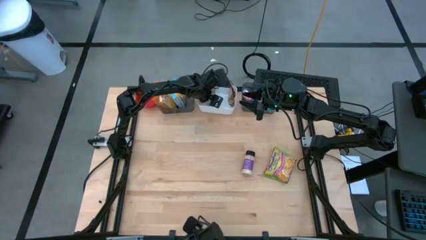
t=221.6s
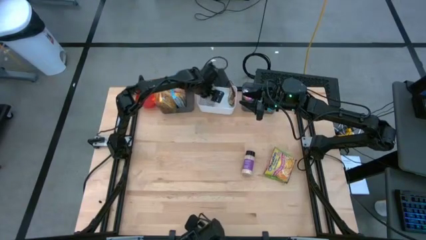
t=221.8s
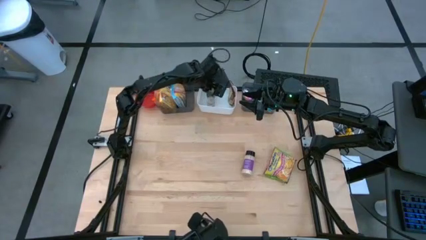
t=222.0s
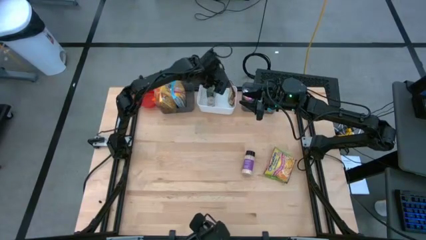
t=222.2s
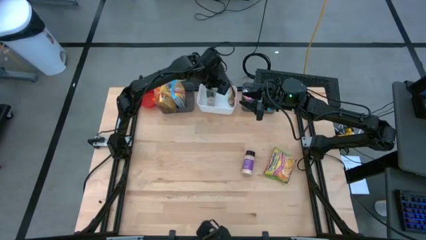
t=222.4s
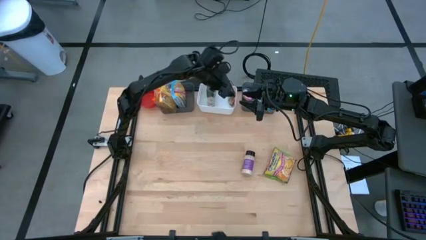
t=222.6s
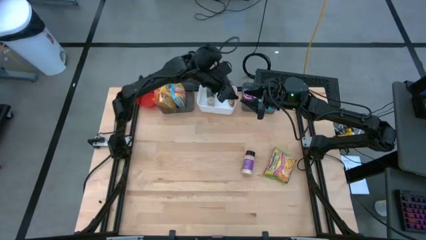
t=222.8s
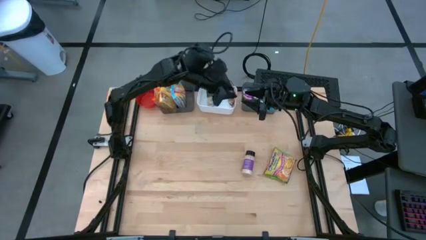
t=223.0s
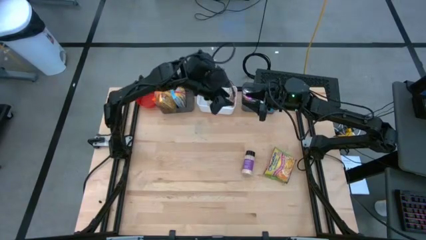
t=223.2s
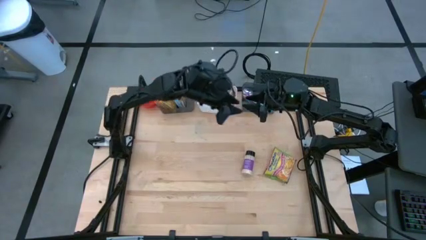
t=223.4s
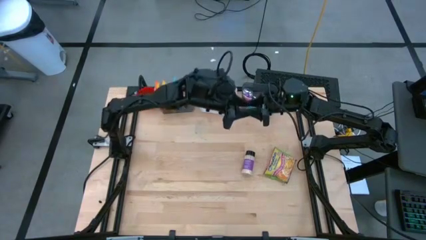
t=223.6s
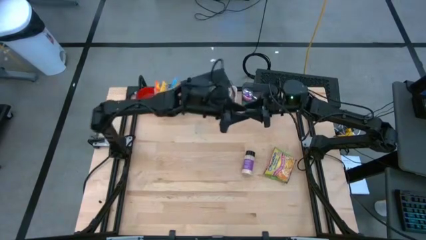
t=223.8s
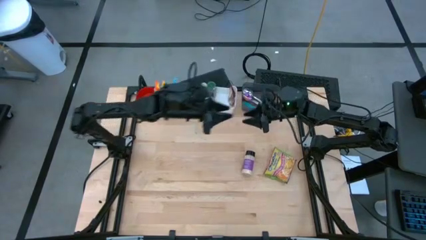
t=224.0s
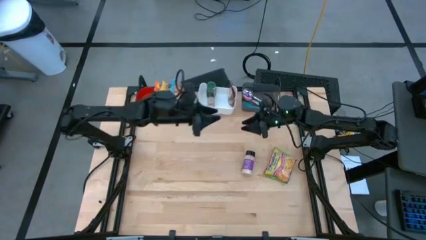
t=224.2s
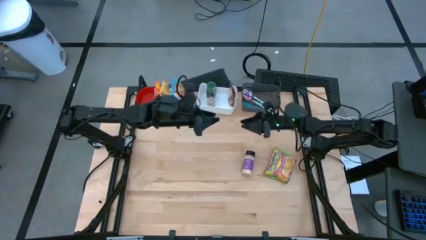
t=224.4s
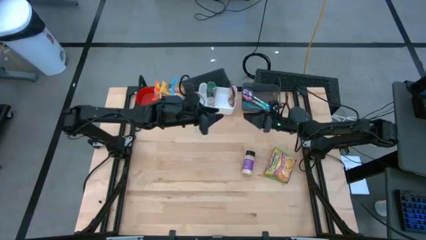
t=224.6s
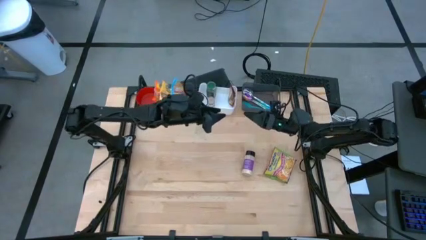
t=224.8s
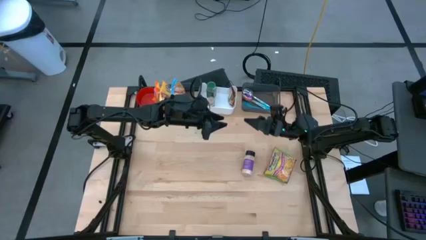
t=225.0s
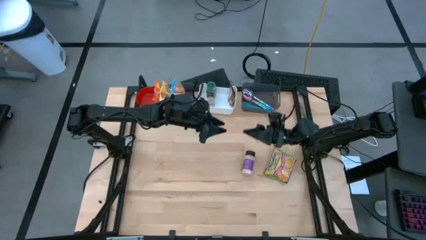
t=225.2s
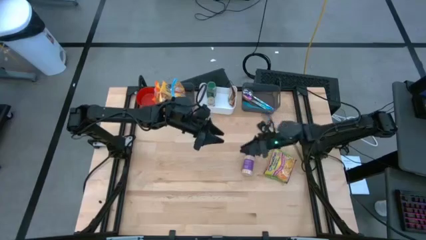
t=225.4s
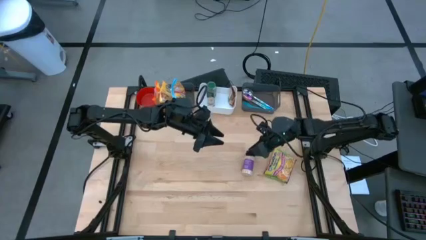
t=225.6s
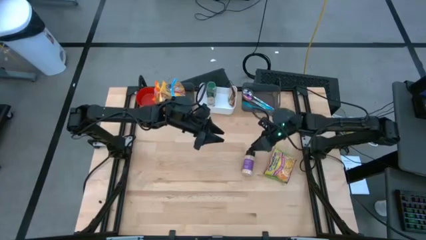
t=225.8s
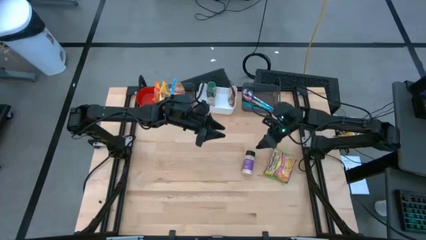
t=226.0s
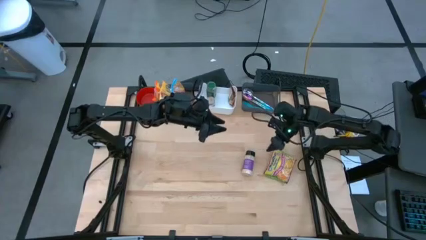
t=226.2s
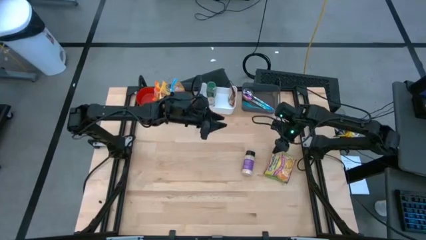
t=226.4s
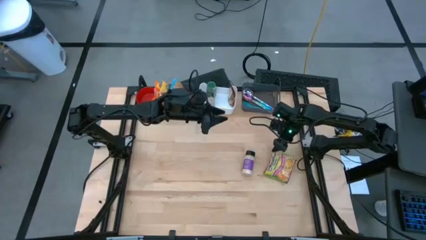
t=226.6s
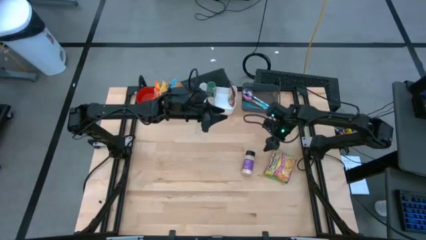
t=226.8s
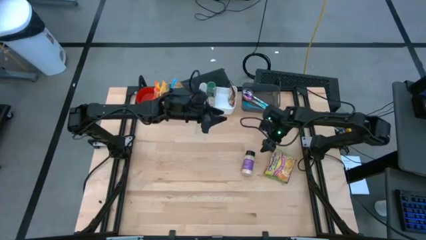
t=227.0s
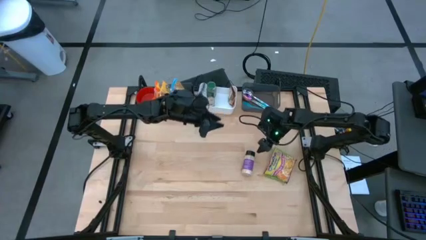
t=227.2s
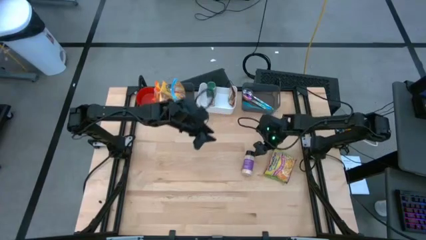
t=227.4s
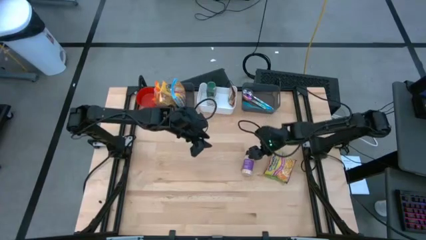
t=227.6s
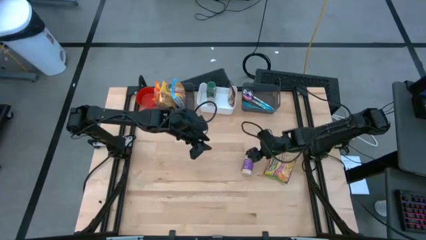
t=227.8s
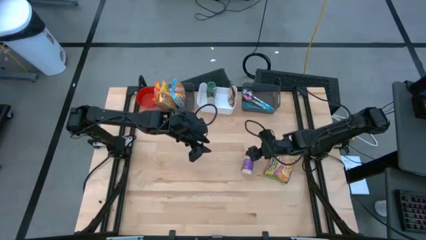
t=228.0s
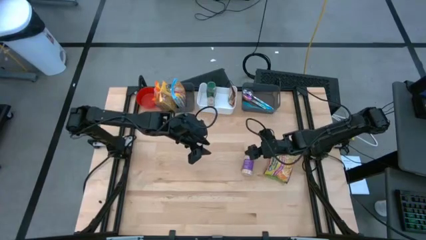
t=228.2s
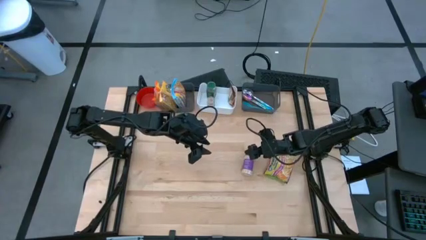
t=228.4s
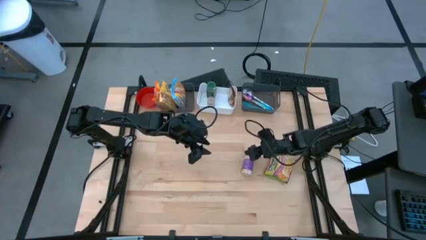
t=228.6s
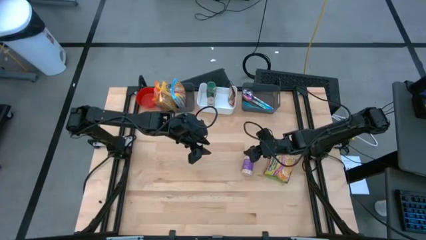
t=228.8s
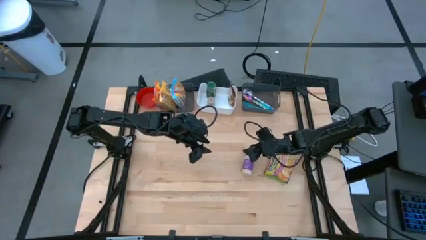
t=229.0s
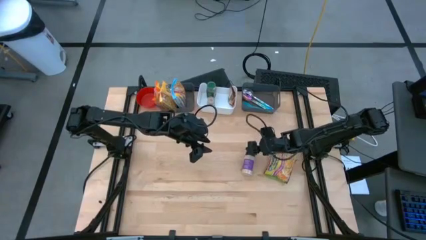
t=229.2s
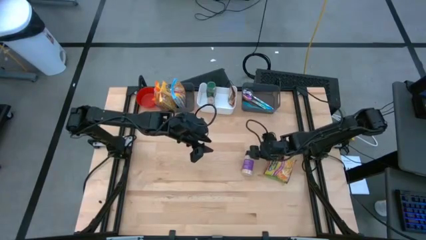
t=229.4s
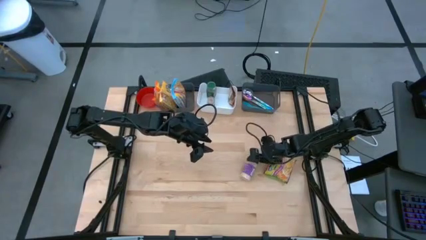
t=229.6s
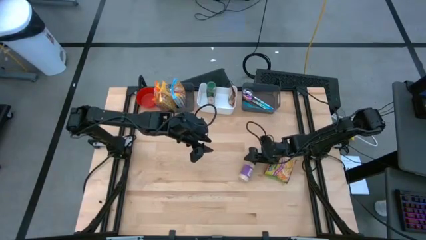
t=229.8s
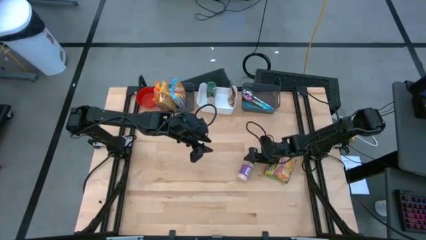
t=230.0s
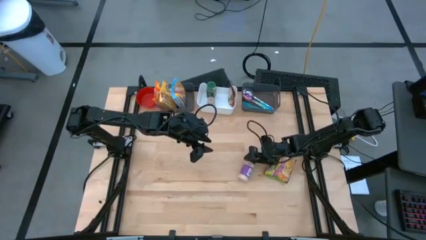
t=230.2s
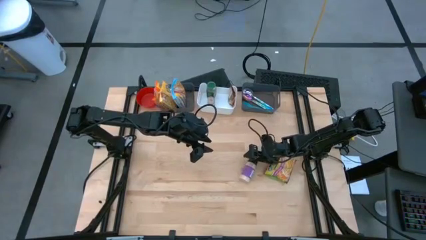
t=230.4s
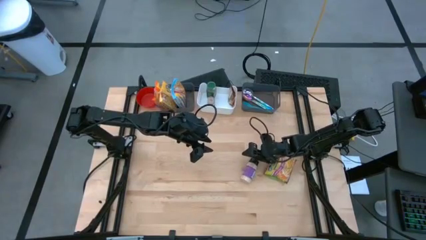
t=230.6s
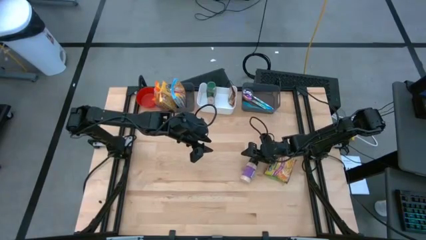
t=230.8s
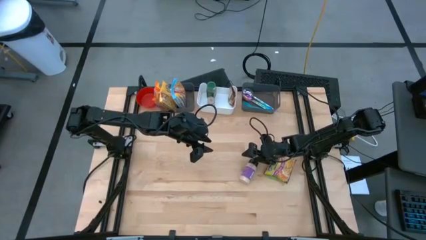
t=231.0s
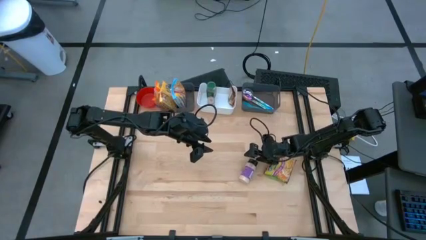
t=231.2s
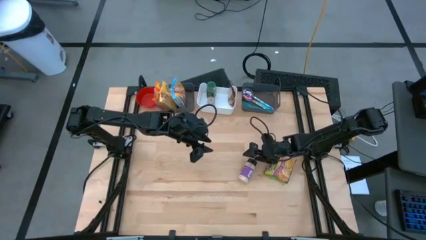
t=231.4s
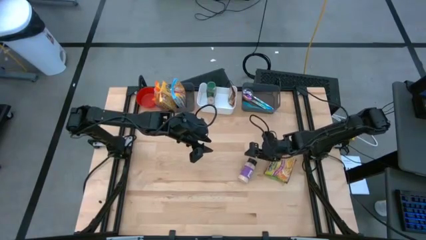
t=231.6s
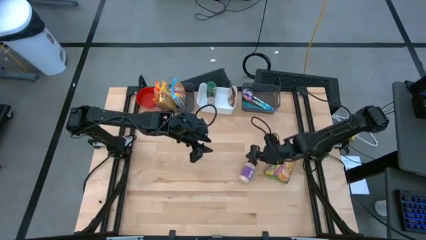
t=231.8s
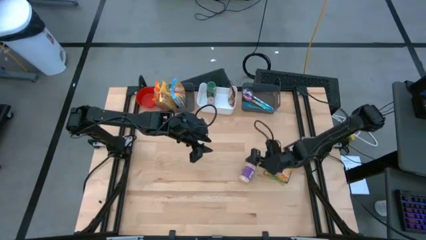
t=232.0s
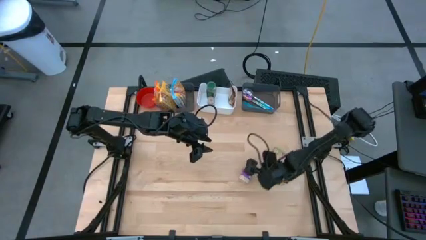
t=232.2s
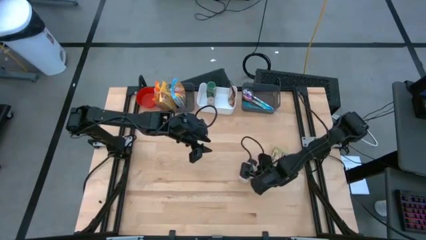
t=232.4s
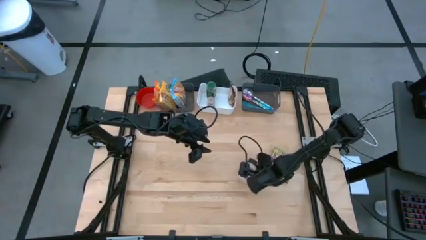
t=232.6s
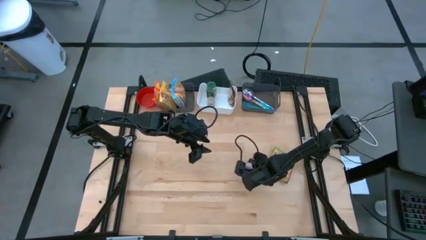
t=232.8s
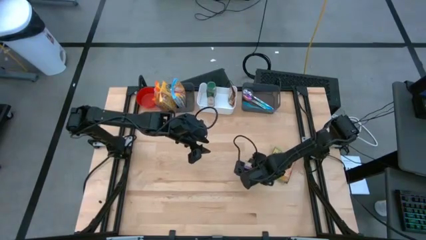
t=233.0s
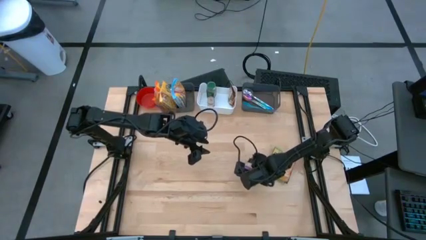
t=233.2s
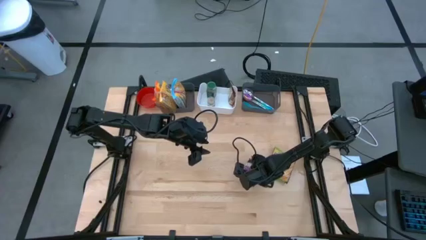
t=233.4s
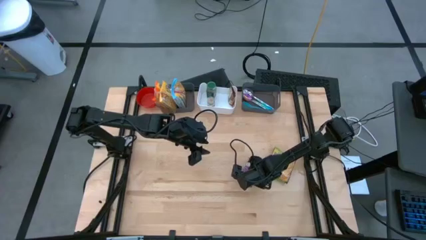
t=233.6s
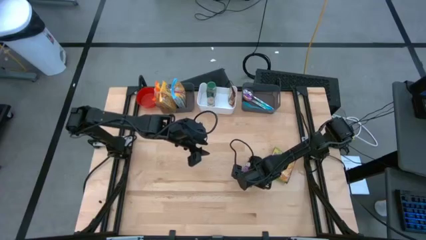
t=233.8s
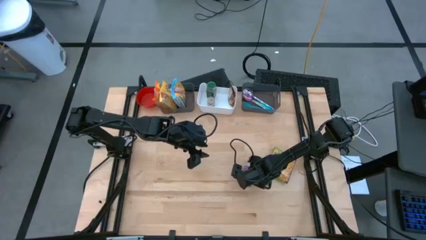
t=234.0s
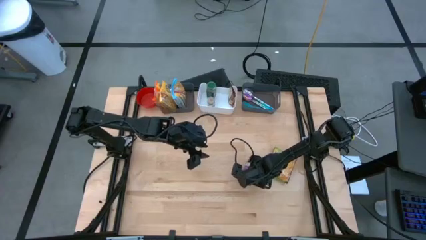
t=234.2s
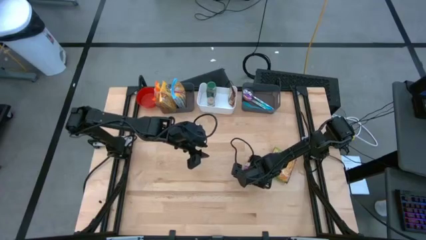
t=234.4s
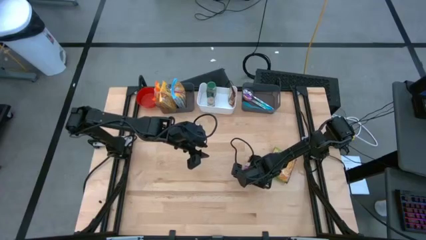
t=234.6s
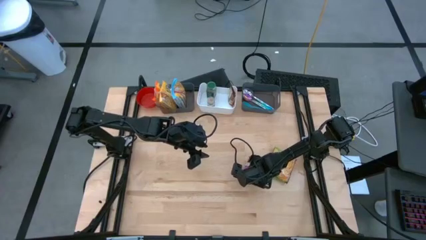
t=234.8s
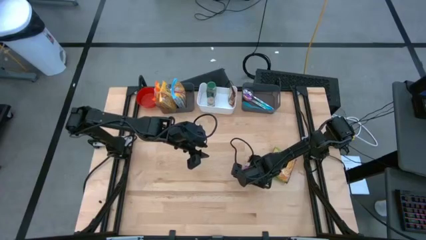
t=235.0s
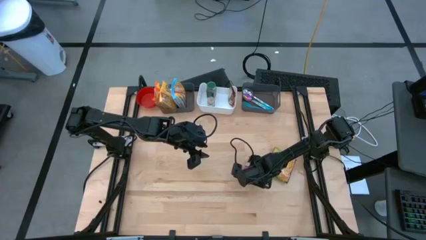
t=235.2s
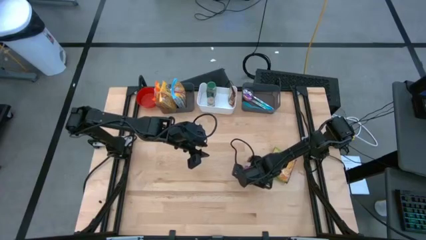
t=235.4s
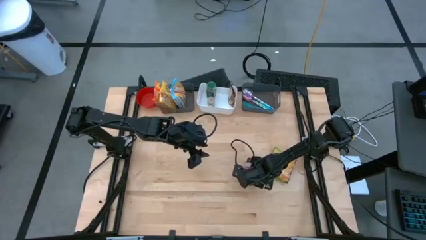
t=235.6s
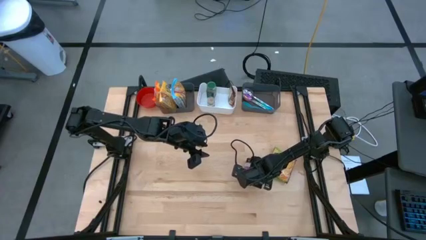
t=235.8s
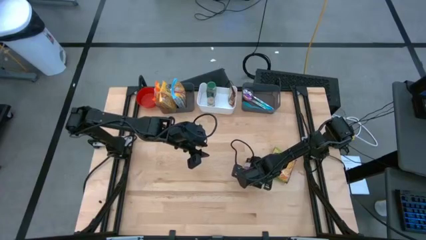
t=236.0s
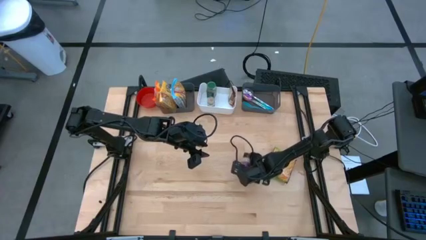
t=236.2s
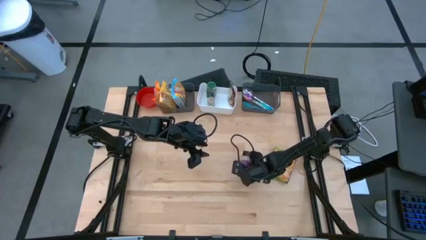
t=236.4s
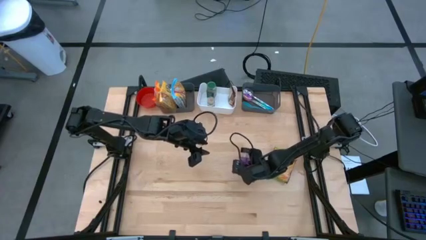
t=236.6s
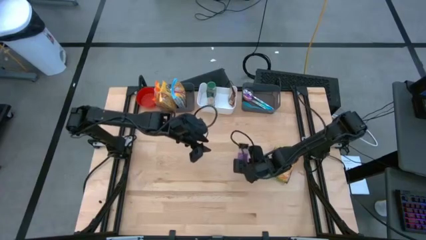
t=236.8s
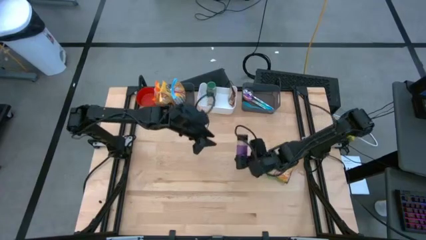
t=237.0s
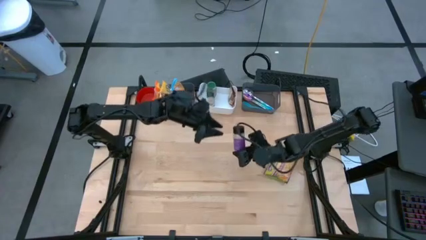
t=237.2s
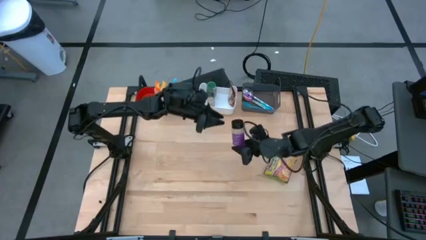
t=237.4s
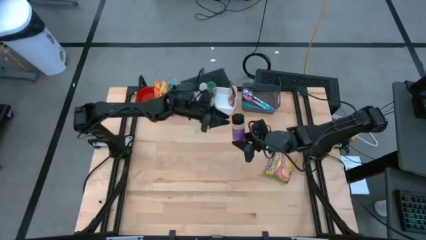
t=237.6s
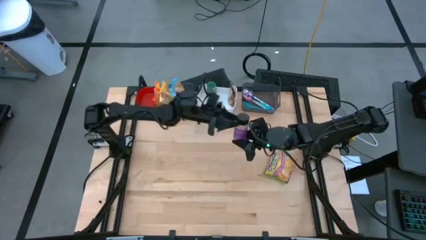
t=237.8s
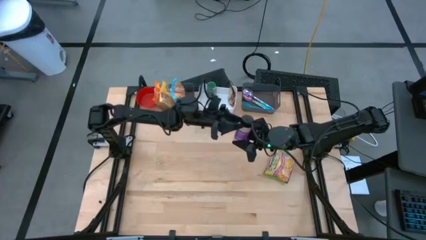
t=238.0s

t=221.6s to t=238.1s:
Task: Pick & Place Food Item
Put the purple seasoning bottle into the white bin
